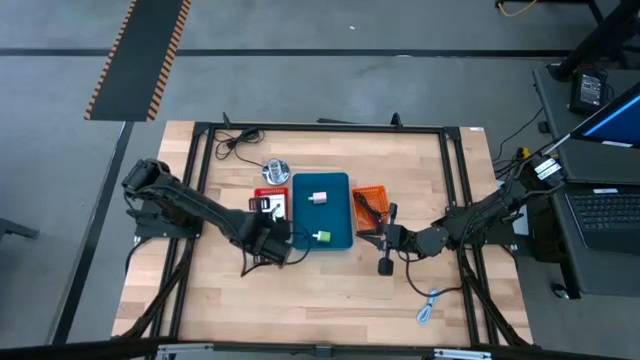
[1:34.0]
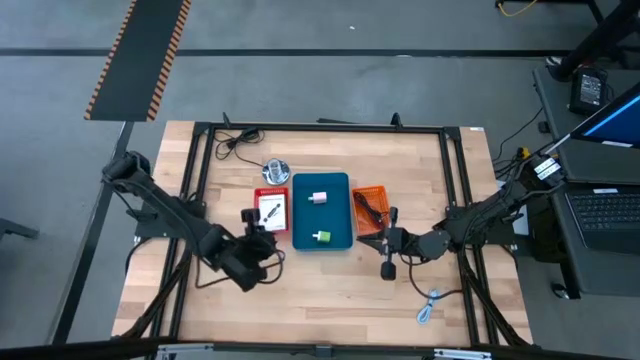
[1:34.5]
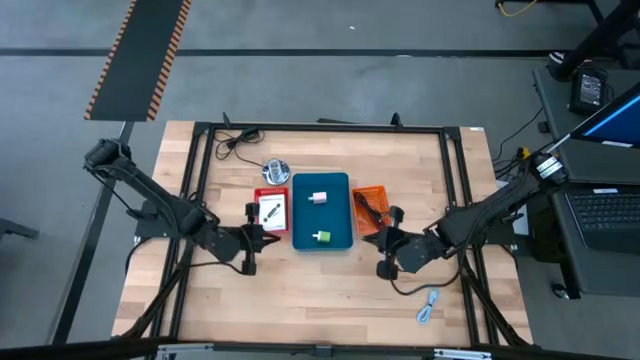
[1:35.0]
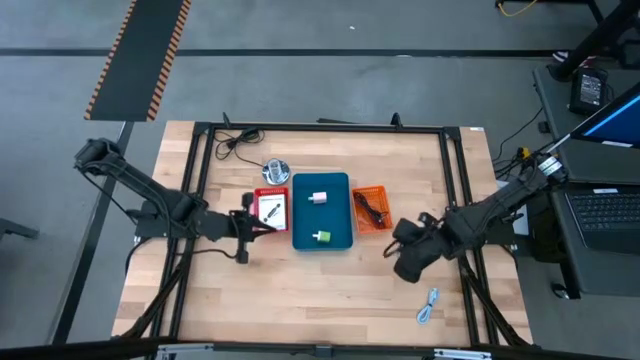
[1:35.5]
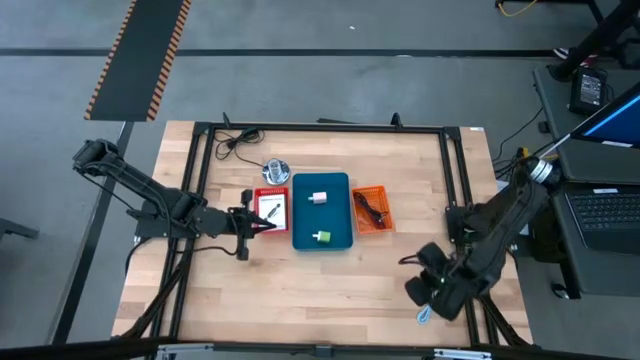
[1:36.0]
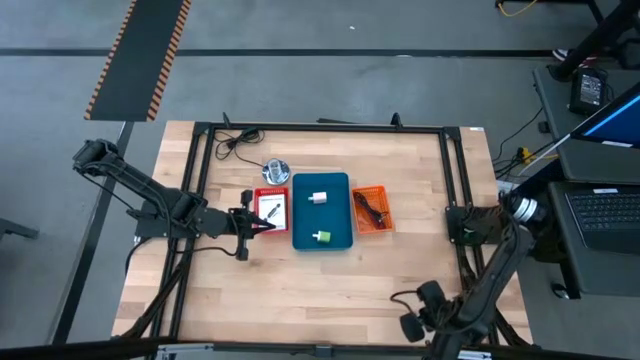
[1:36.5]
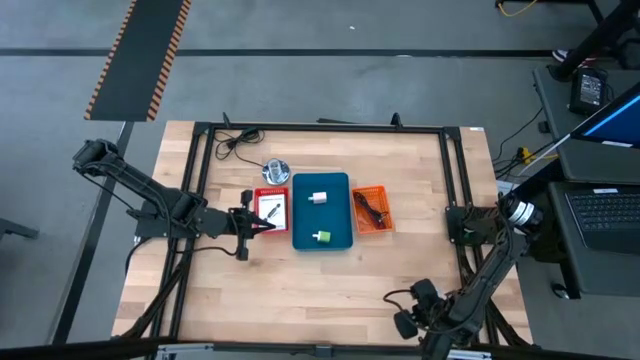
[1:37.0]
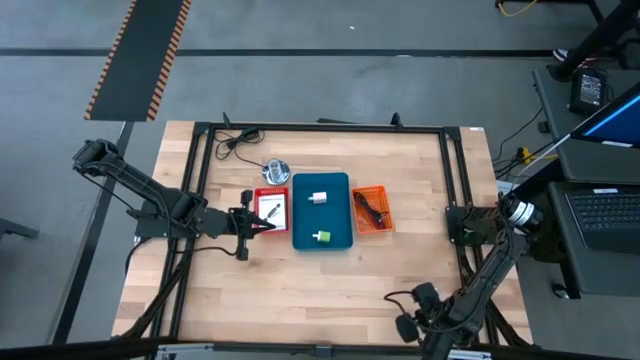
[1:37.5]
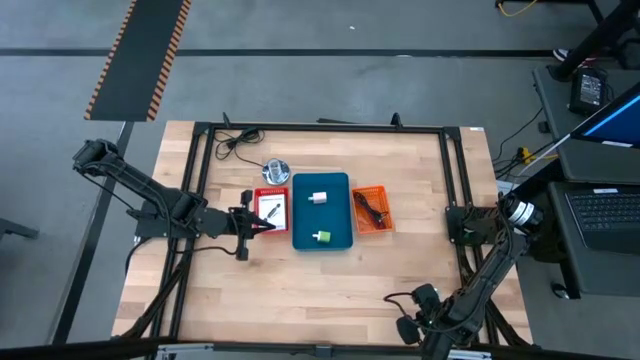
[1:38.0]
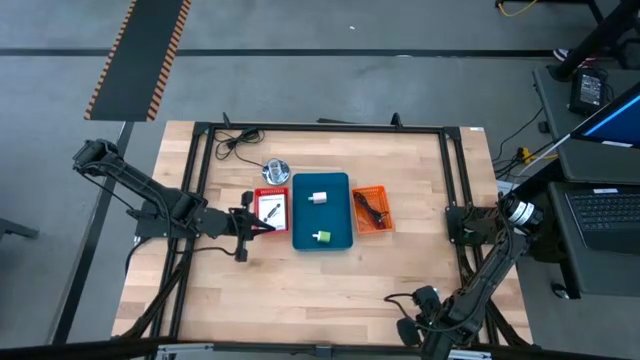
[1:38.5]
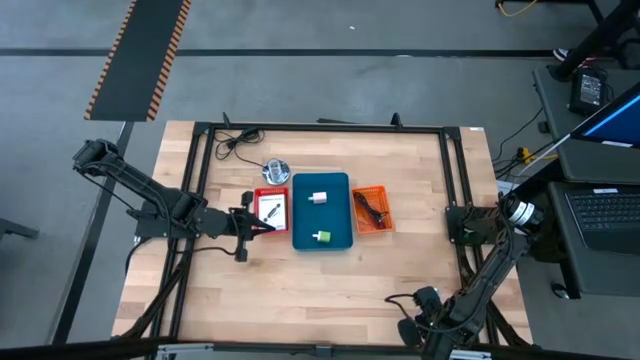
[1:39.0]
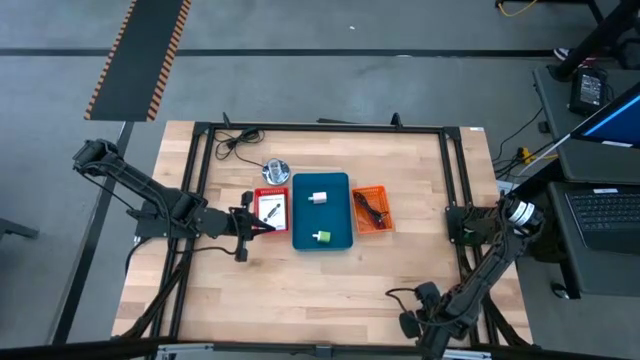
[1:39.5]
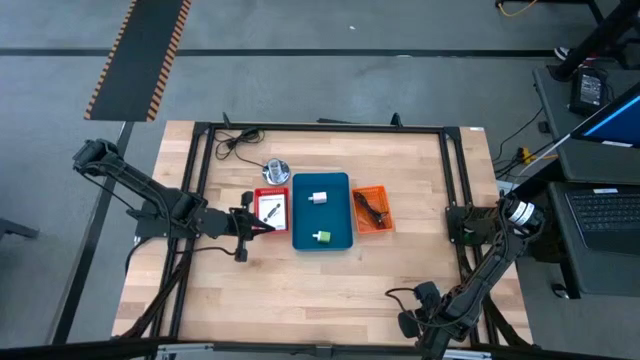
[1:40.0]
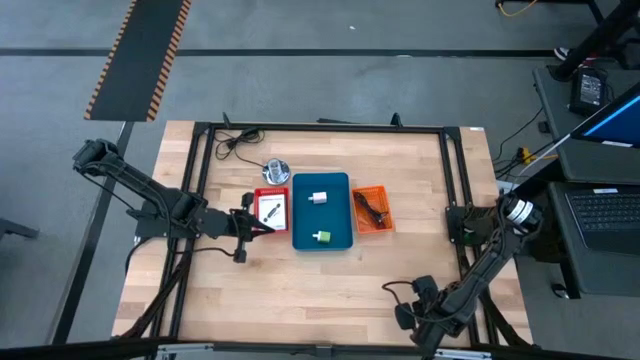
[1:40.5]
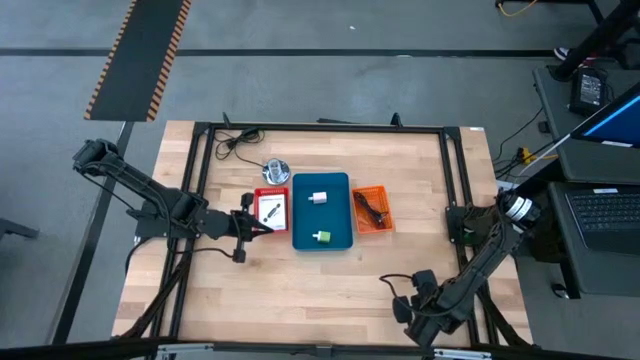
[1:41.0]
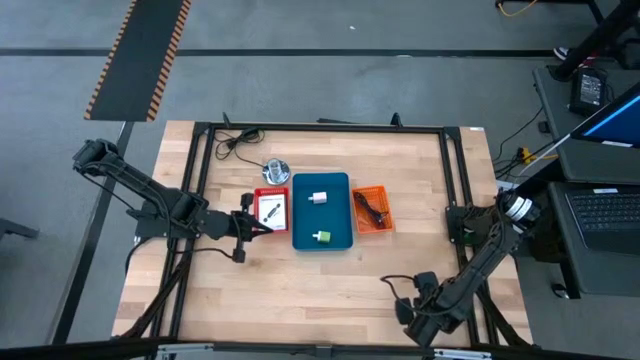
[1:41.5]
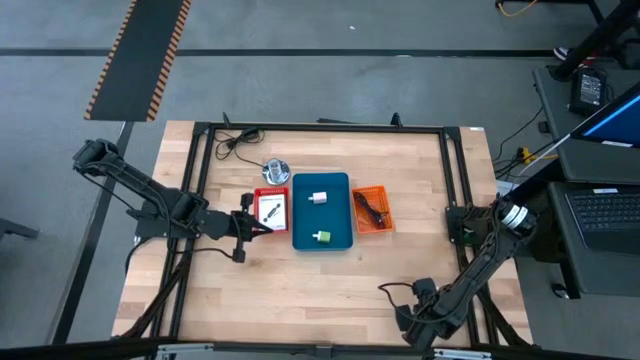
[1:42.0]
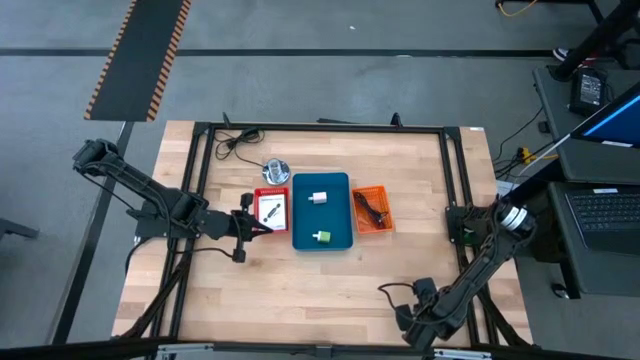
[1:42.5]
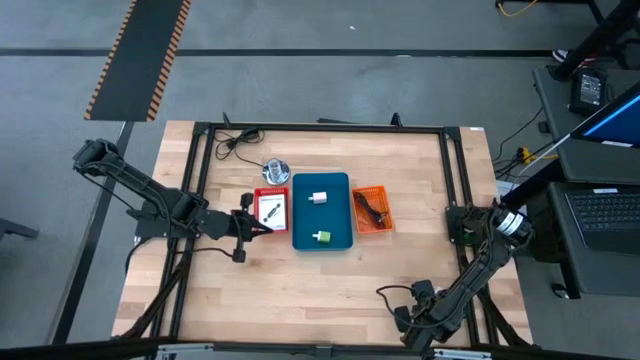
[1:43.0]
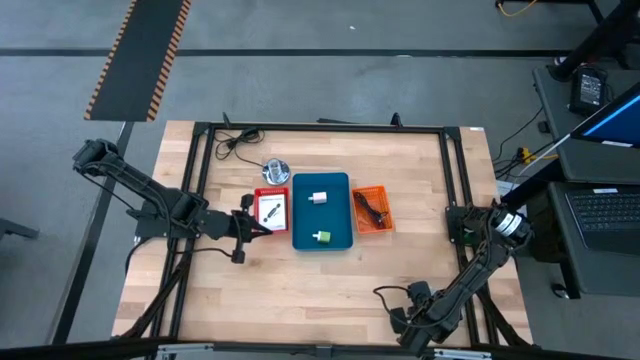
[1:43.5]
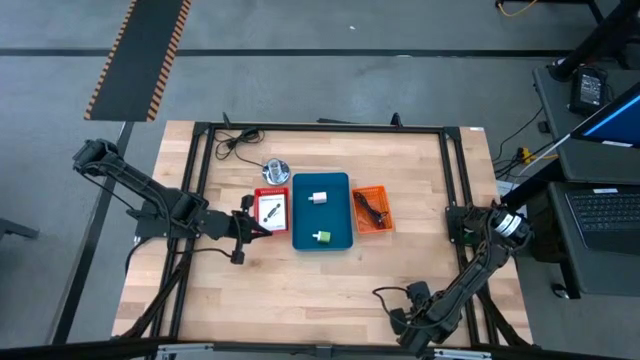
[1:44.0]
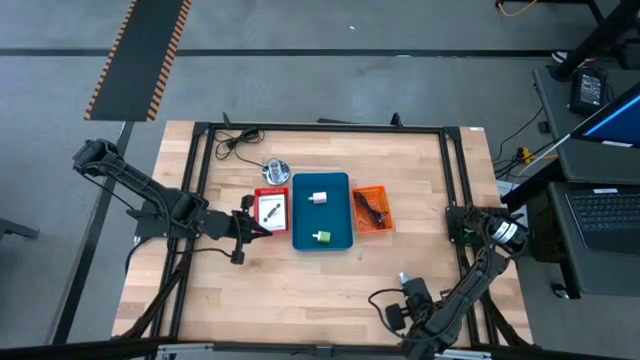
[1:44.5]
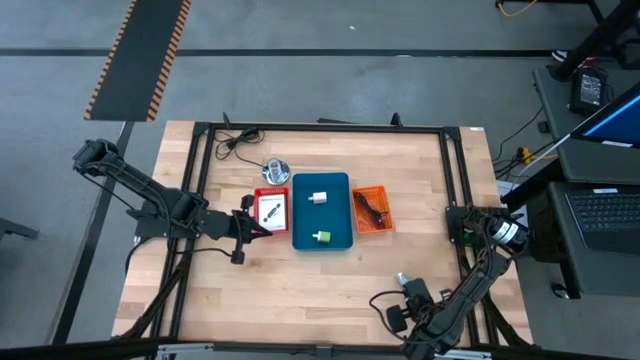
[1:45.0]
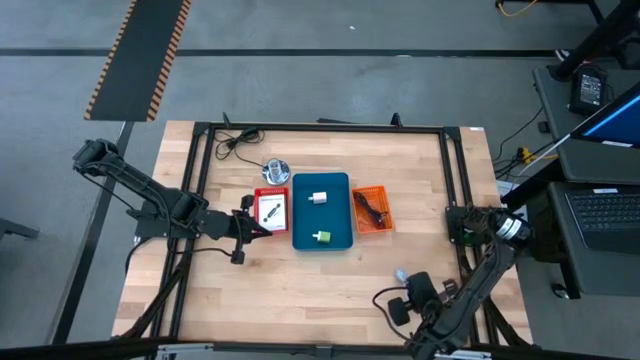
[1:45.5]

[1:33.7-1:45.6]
Task: Pick and place items into bin
Put the light blue USB cable into the orange bin

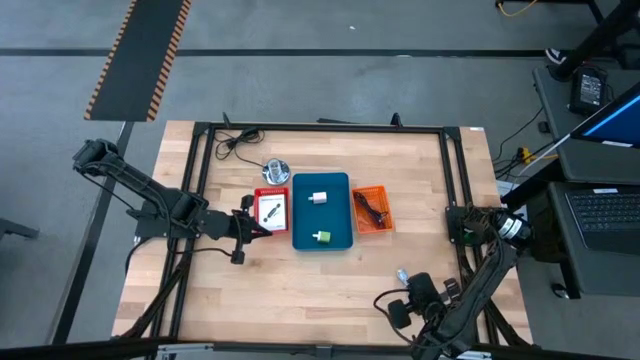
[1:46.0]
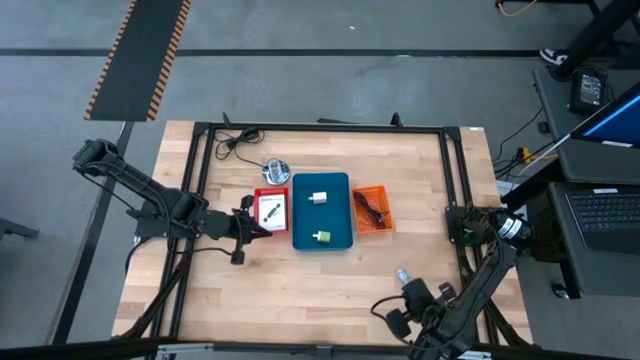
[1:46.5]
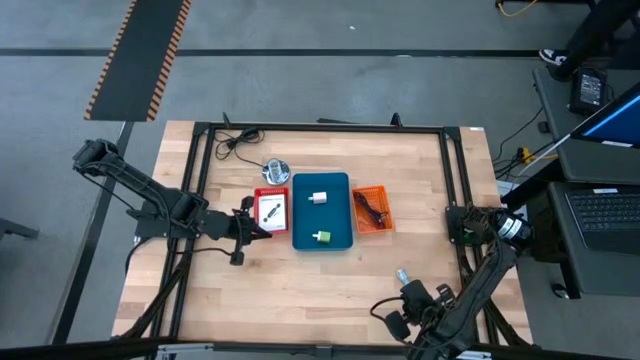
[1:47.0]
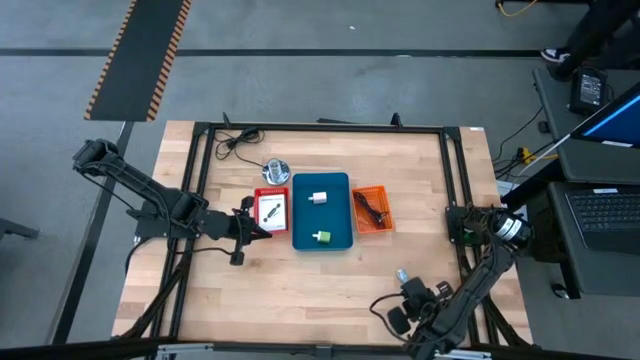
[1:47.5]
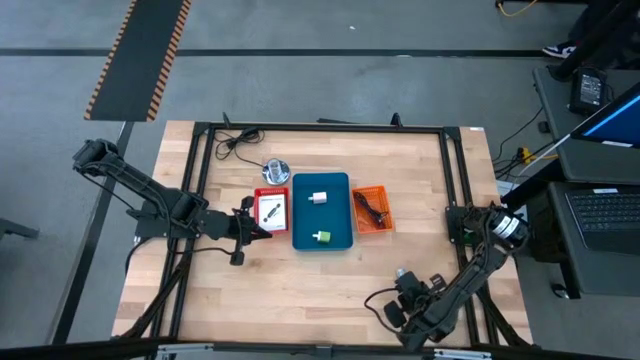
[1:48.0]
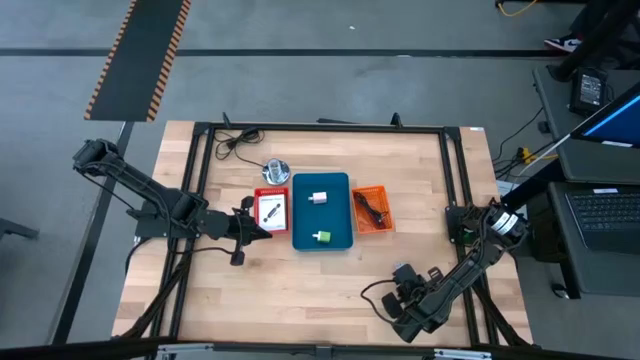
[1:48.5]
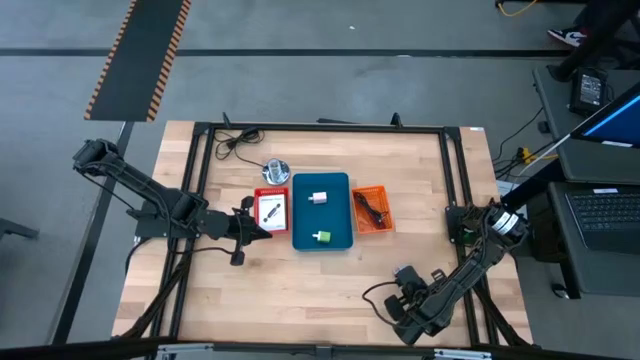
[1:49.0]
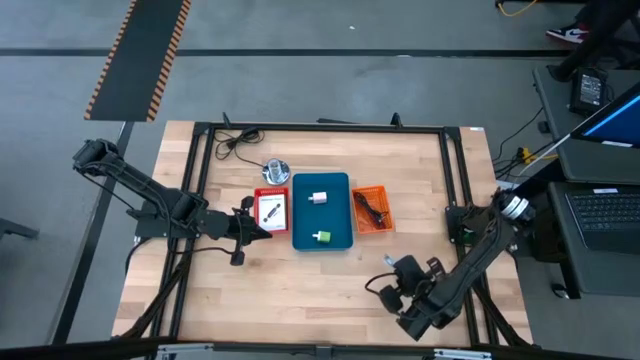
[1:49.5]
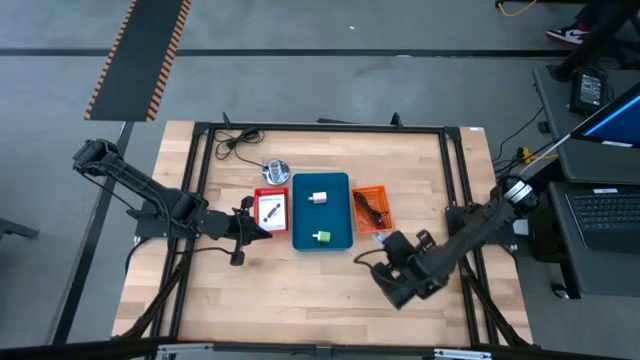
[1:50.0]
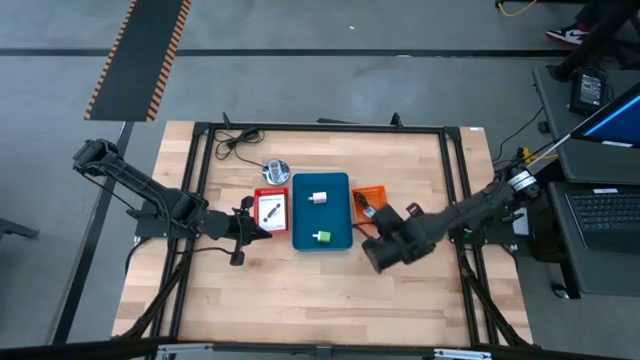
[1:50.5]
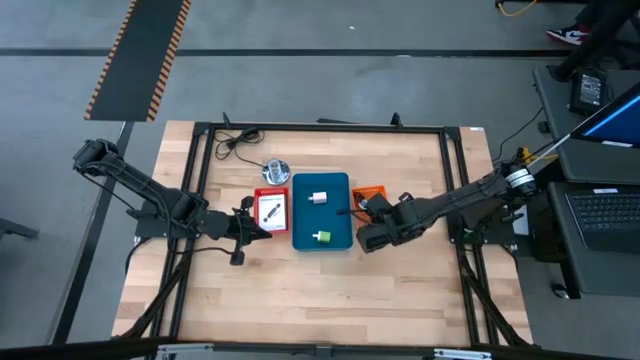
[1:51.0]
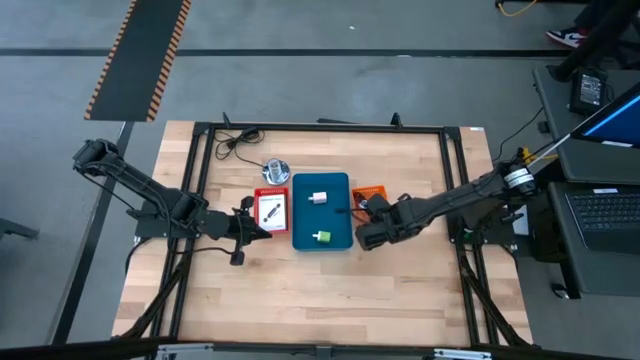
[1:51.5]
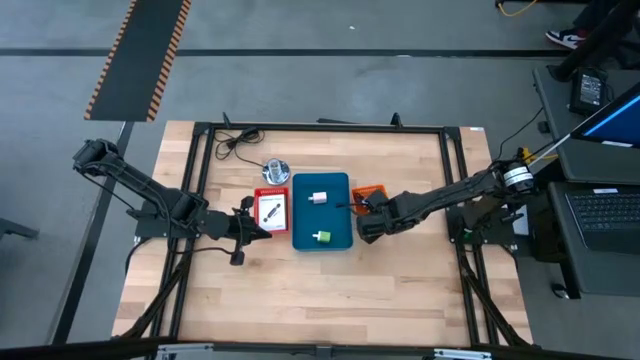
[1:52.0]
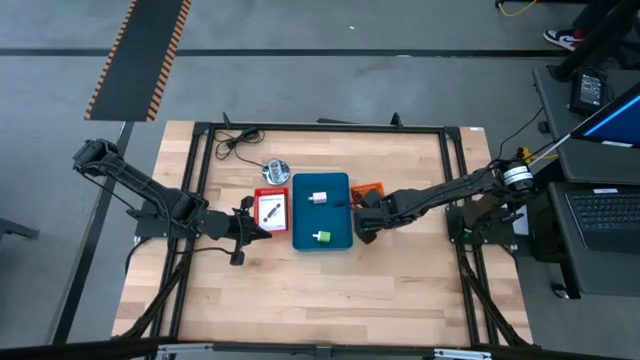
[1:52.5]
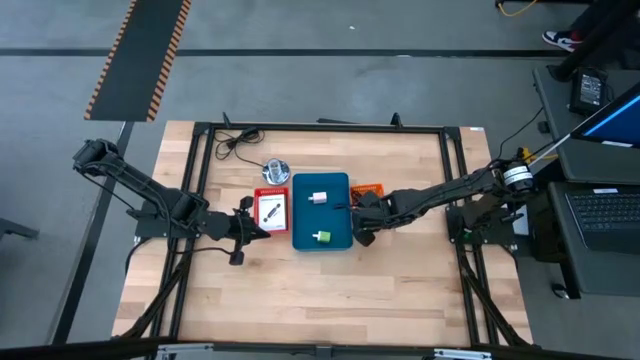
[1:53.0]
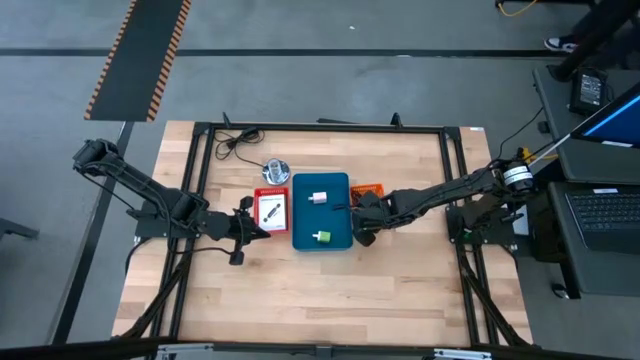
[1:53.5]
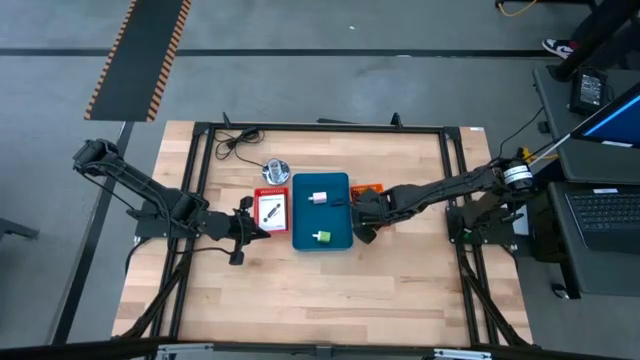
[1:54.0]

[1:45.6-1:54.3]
Put the light blue USB cable into the orange bin

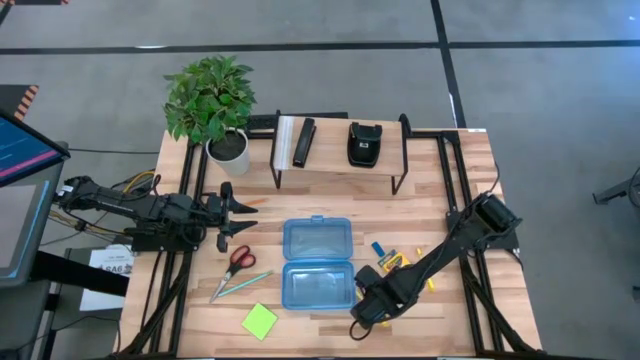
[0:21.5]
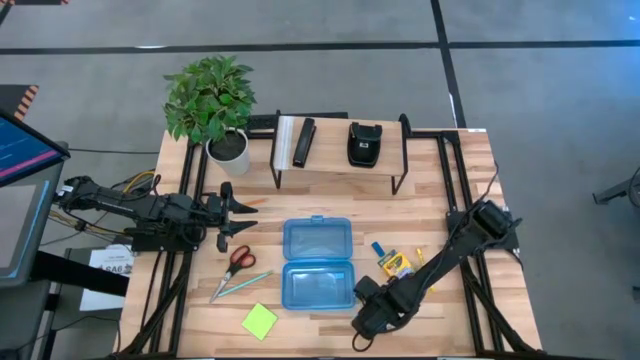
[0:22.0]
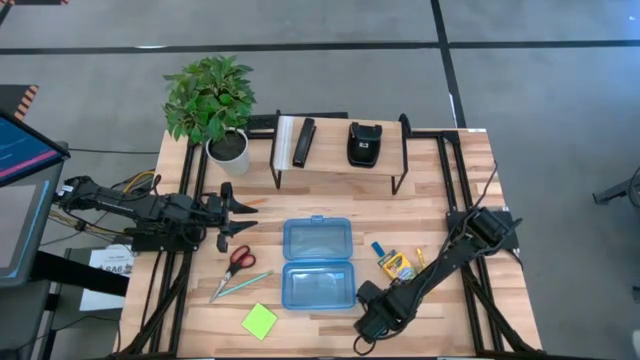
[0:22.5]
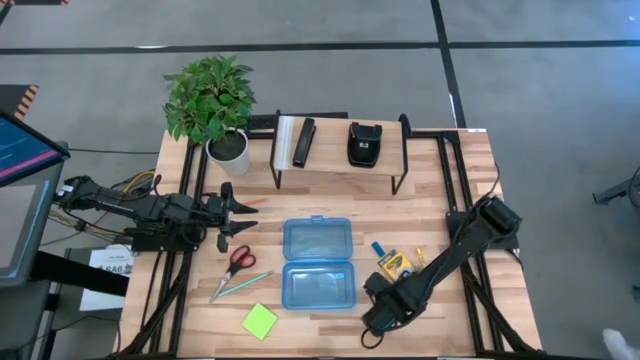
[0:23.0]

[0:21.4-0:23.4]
Task: Pack school essentials
Put the bottom yellow highlighter pen into the blue supply box
